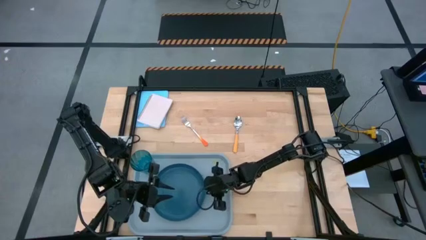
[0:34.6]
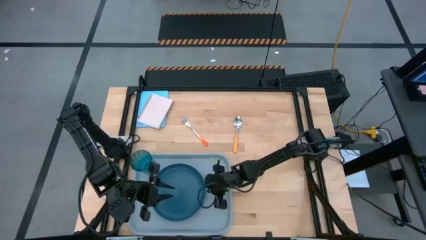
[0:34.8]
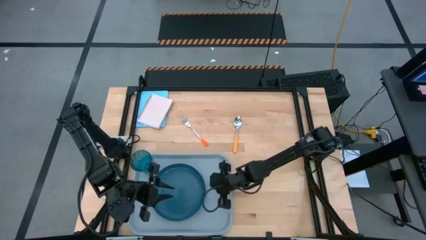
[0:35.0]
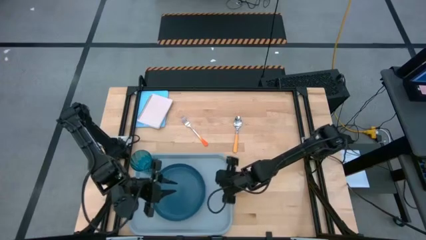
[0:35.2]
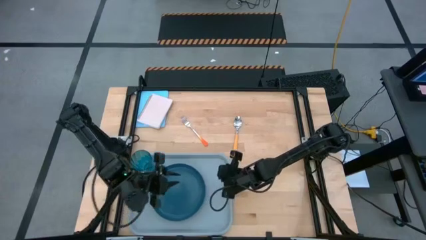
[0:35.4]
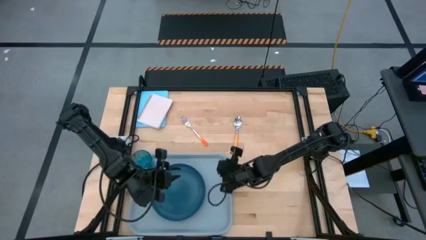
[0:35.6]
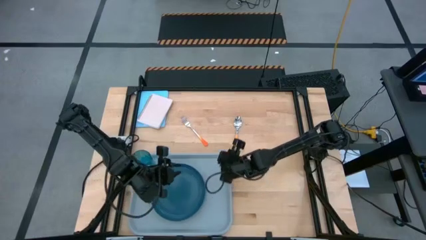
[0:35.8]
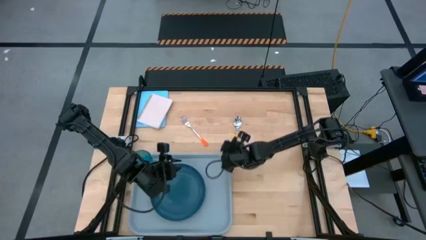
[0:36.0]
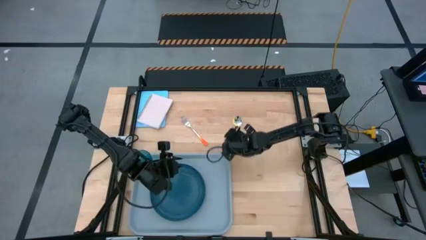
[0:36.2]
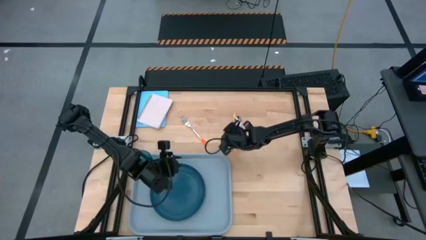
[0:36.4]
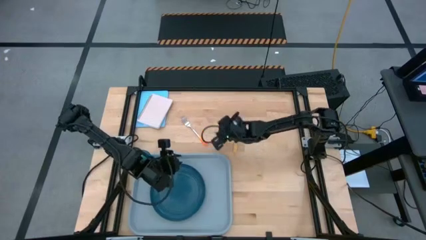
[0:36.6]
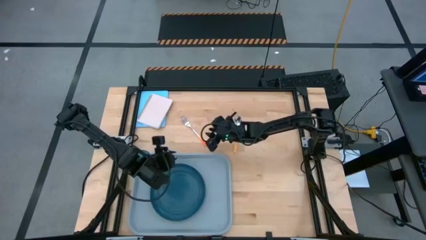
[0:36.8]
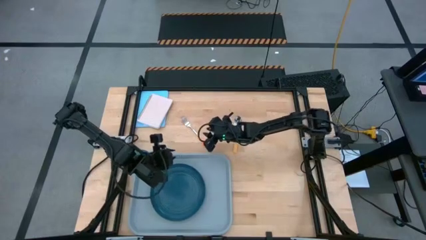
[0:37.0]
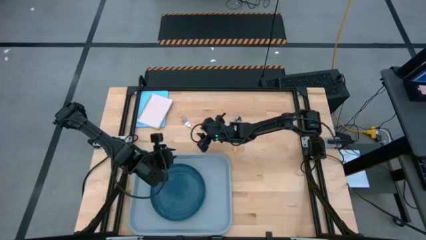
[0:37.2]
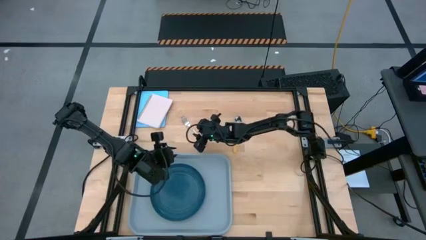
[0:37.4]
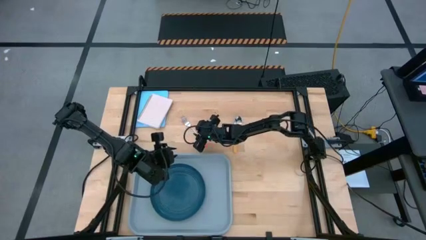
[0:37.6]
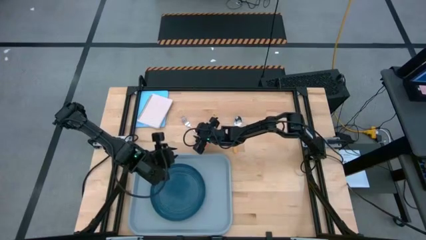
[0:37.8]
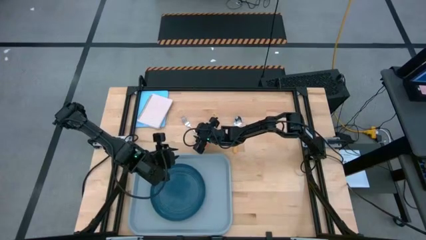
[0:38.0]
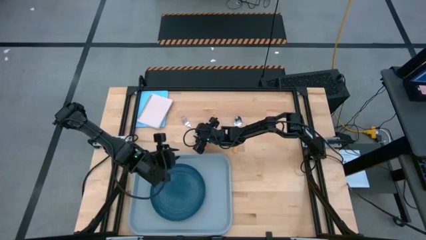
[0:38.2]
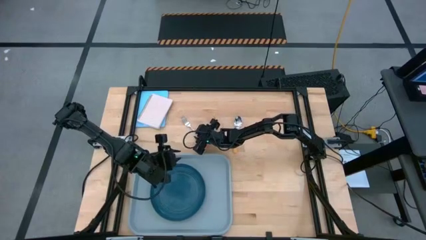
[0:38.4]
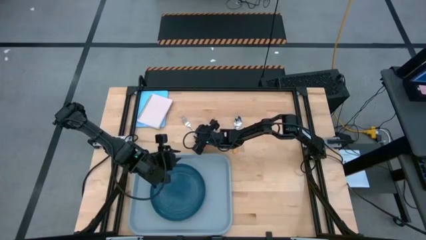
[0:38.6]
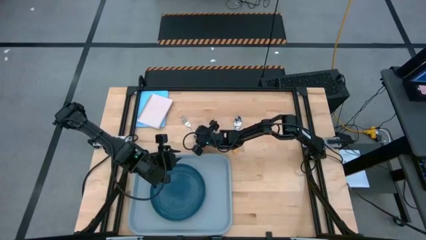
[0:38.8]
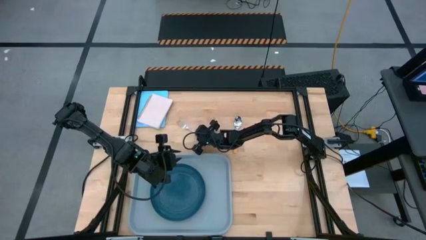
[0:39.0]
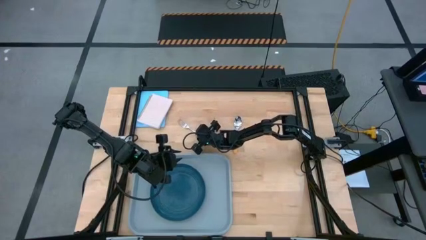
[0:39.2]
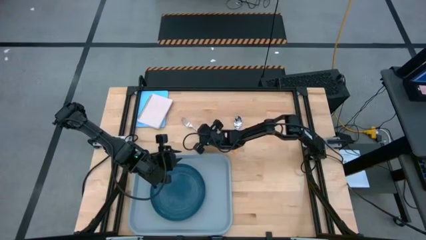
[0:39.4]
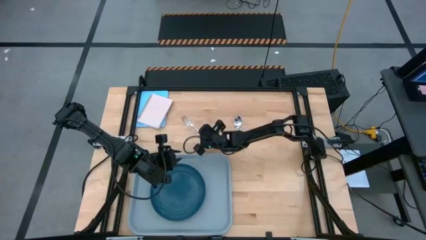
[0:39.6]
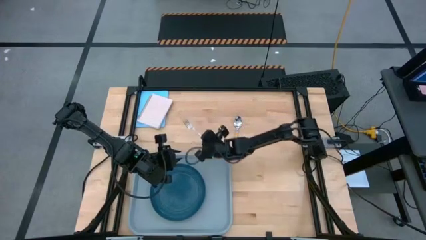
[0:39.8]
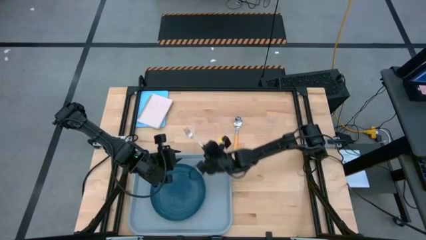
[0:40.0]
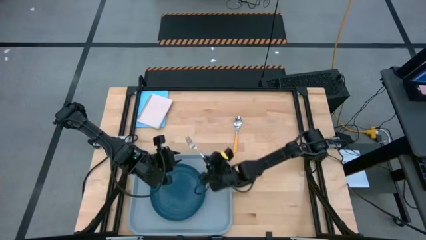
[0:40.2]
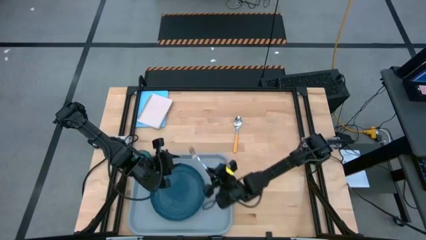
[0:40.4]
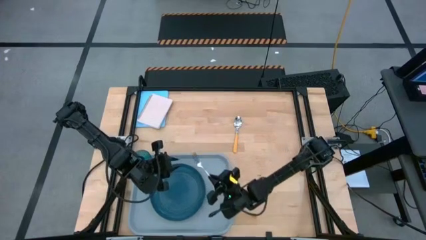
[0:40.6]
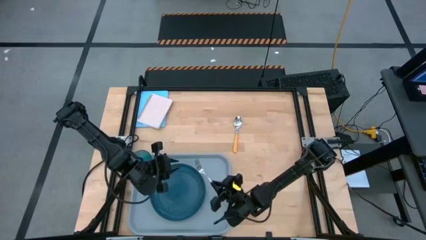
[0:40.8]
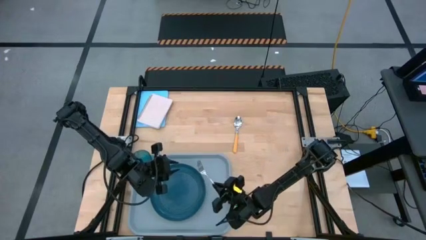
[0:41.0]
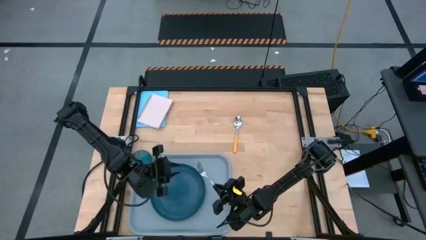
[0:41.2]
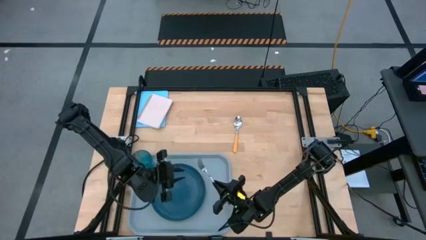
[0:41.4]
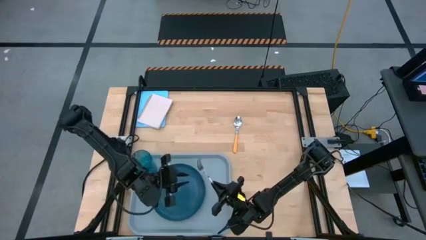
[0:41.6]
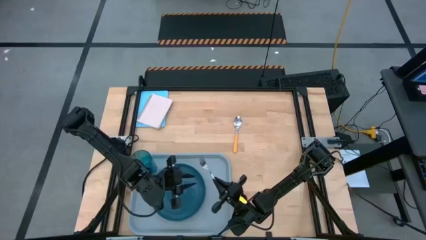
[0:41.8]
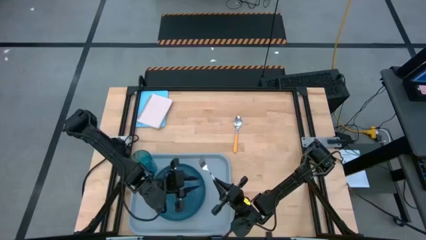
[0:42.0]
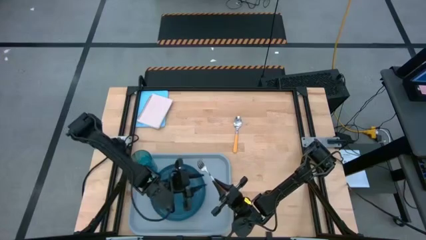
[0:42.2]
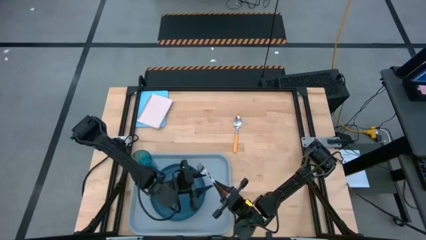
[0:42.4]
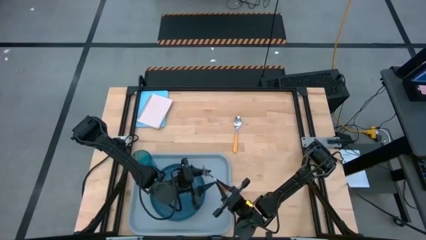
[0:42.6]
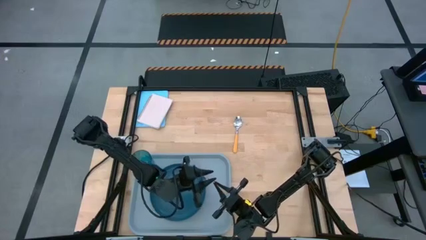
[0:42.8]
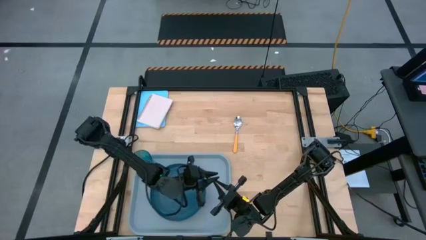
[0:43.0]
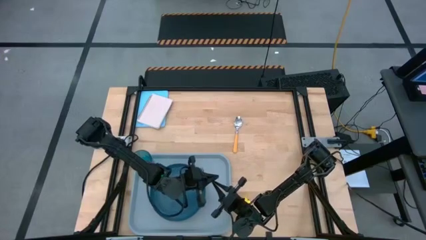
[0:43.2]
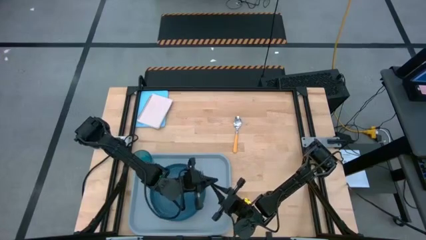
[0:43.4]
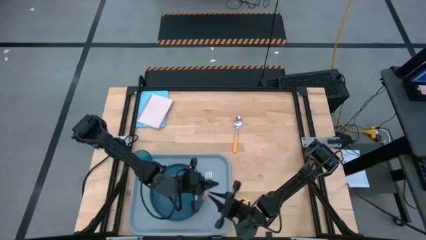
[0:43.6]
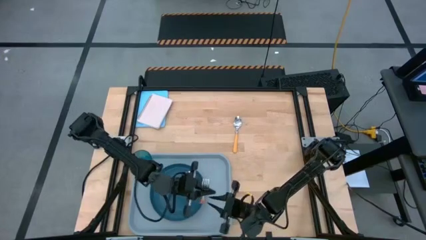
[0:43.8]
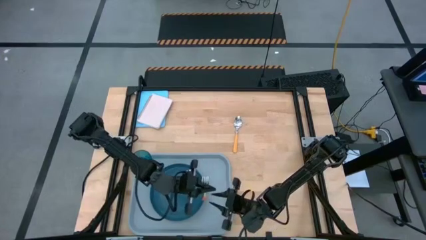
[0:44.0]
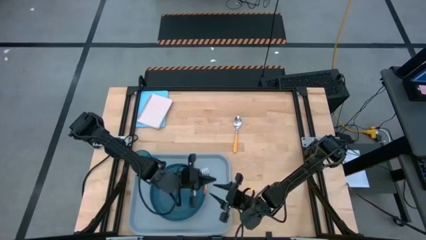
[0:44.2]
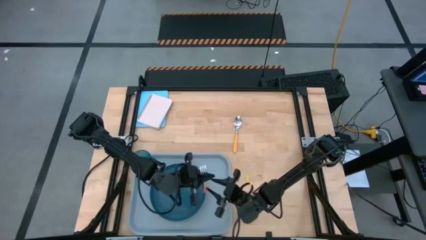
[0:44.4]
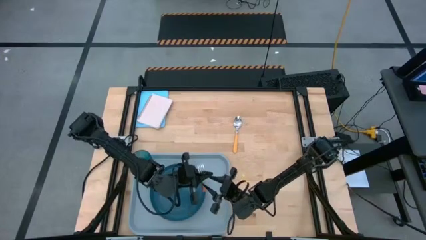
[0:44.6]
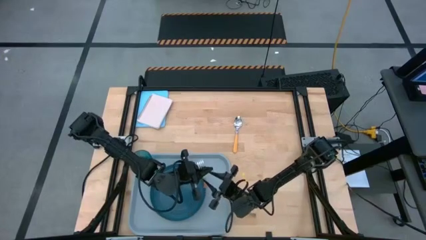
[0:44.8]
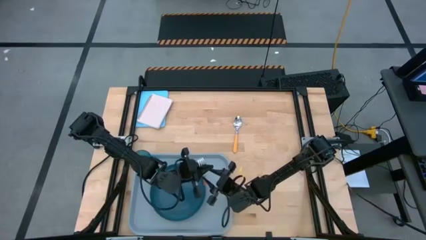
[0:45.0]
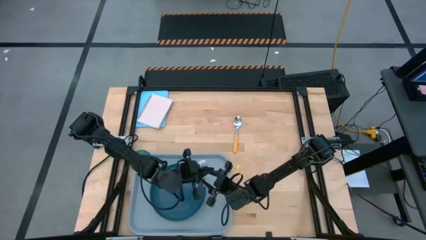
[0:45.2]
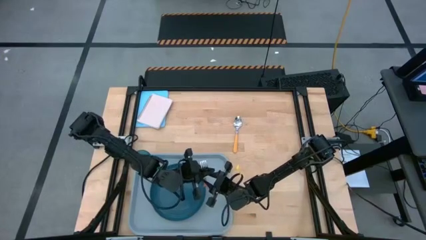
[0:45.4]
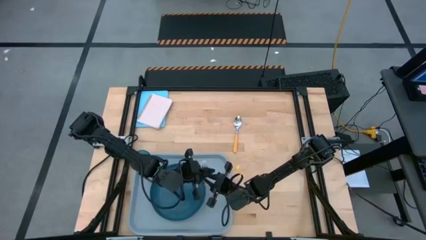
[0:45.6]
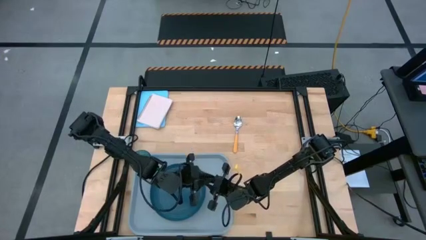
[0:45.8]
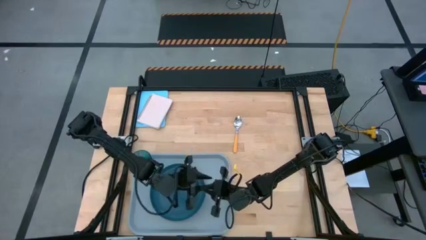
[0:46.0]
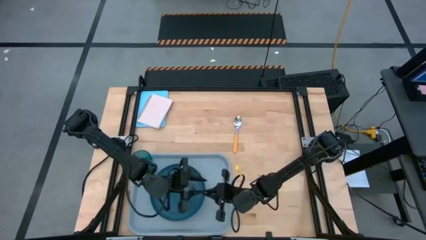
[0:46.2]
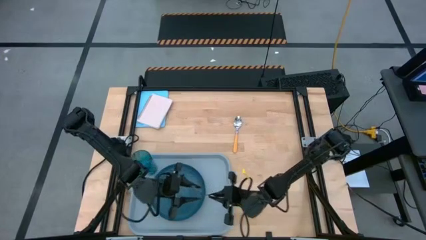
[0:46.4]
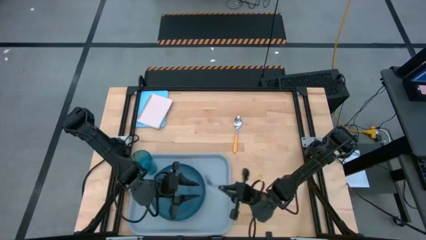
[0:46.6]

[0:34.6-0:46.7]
Task: Pick and place plate/cup/fork/spoon on tray
Put the orange fork on the gray tray to the right of the dark blue plate
